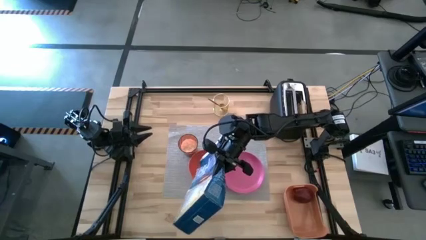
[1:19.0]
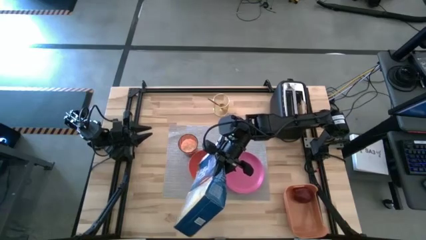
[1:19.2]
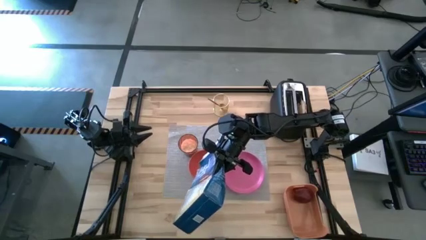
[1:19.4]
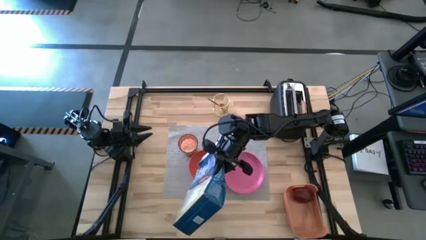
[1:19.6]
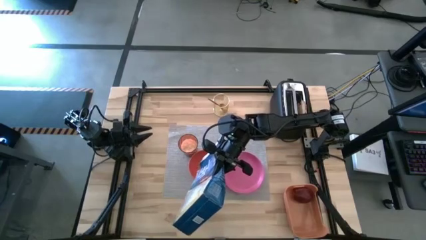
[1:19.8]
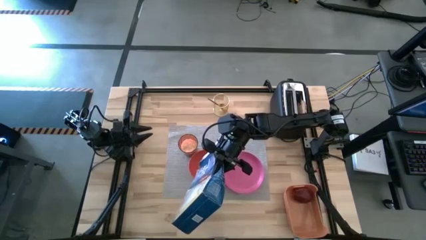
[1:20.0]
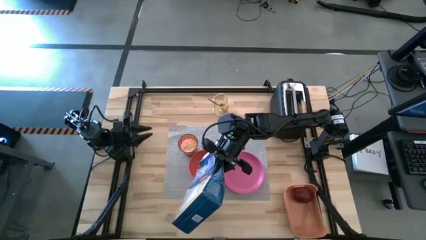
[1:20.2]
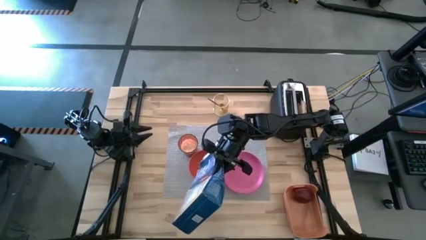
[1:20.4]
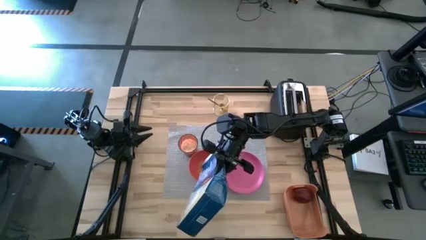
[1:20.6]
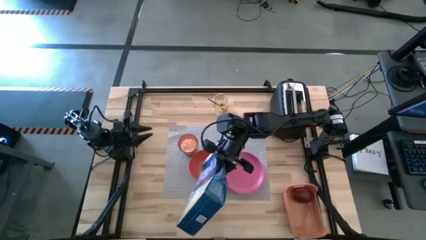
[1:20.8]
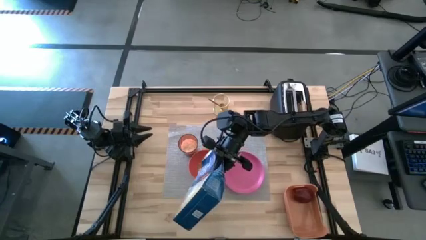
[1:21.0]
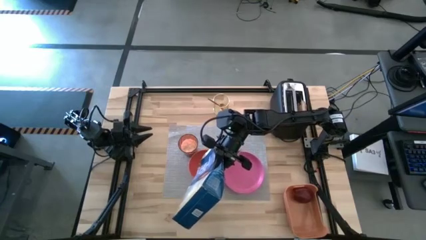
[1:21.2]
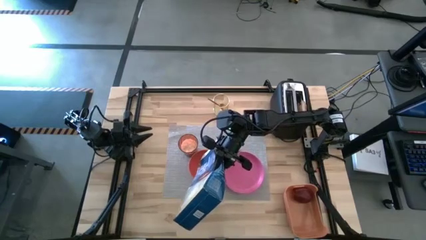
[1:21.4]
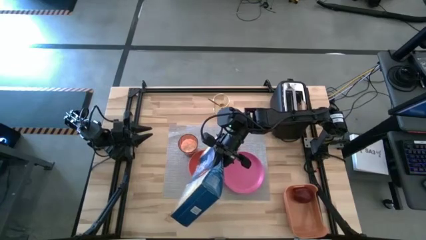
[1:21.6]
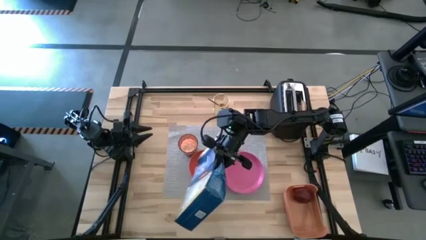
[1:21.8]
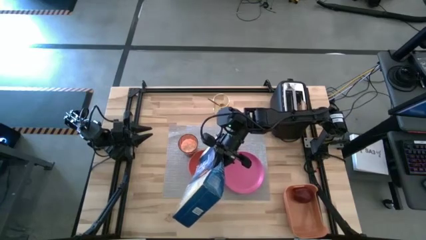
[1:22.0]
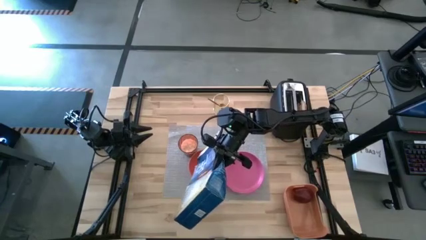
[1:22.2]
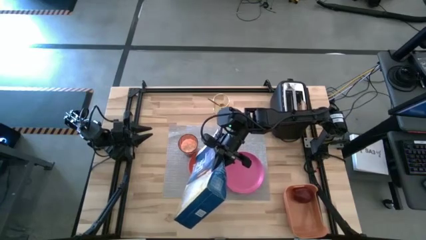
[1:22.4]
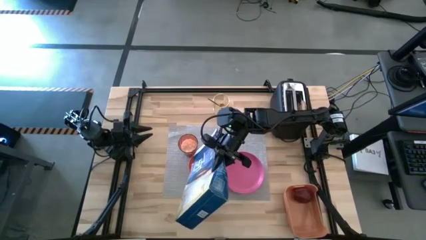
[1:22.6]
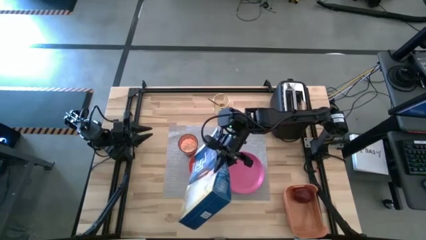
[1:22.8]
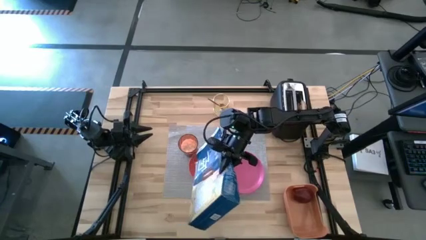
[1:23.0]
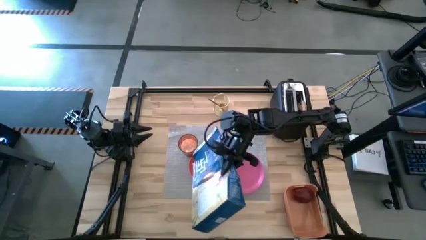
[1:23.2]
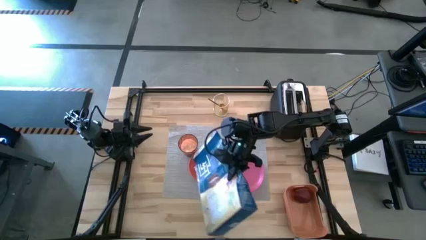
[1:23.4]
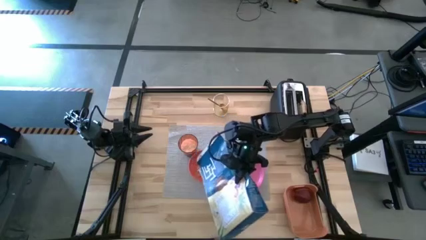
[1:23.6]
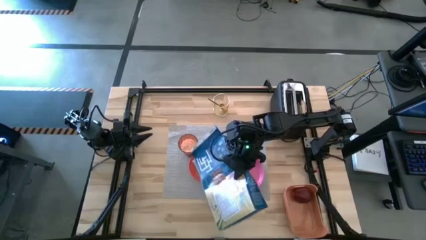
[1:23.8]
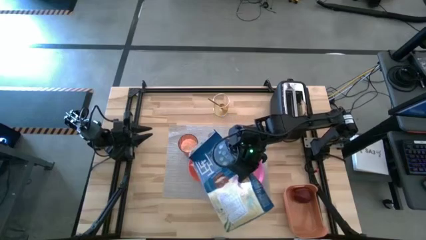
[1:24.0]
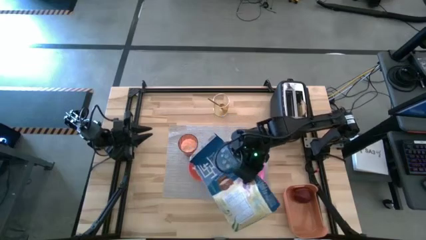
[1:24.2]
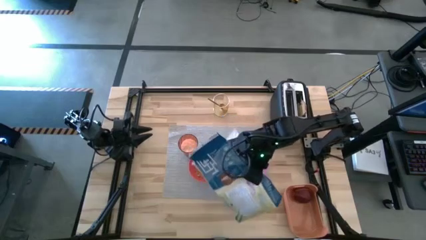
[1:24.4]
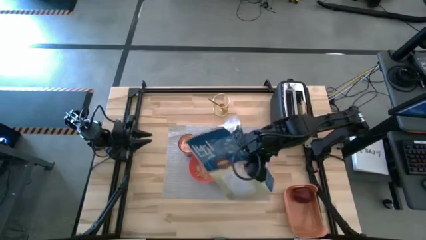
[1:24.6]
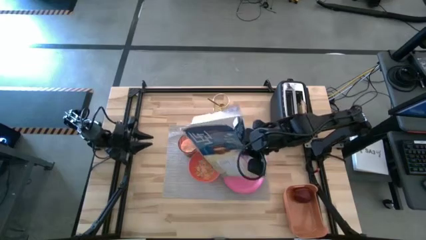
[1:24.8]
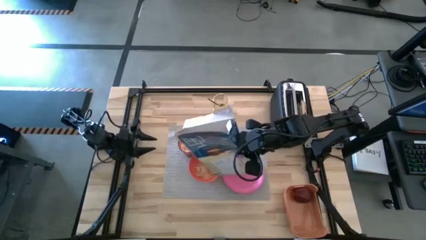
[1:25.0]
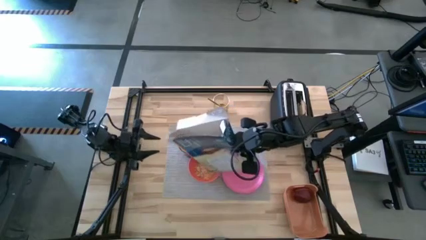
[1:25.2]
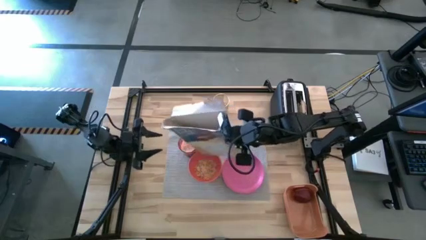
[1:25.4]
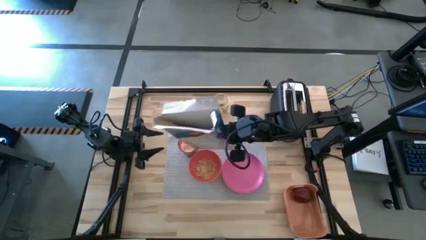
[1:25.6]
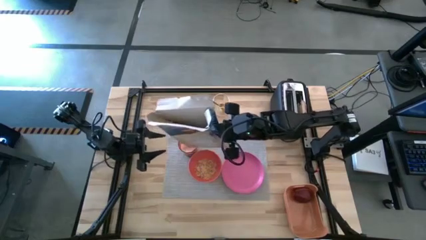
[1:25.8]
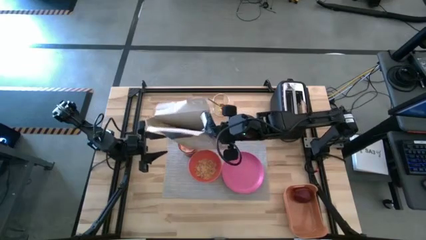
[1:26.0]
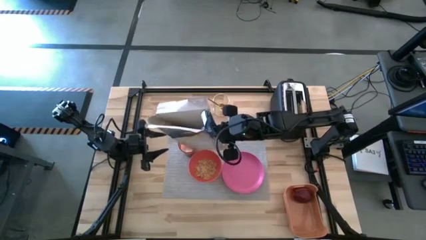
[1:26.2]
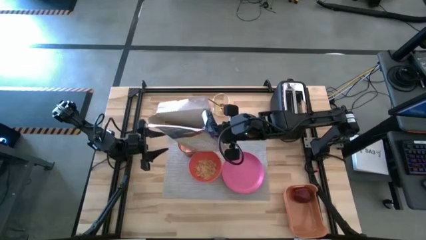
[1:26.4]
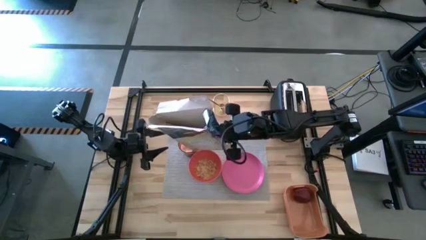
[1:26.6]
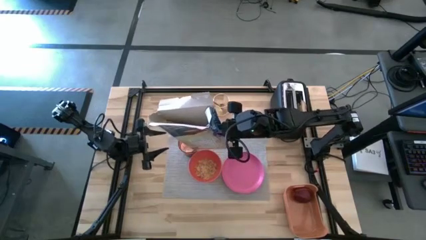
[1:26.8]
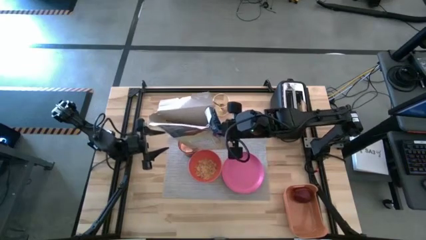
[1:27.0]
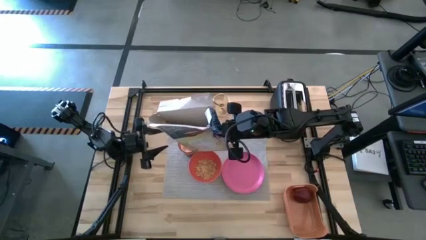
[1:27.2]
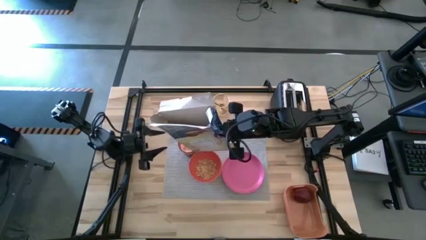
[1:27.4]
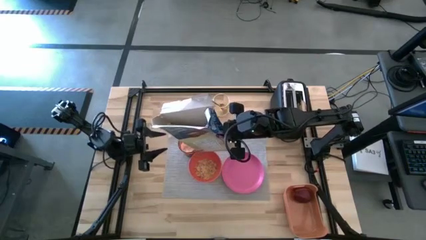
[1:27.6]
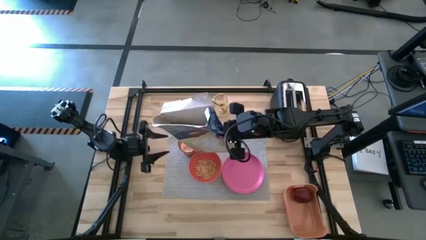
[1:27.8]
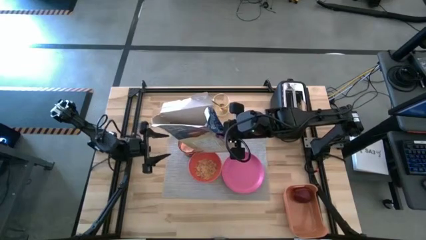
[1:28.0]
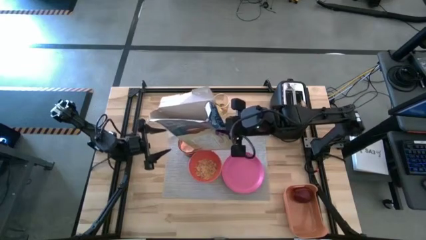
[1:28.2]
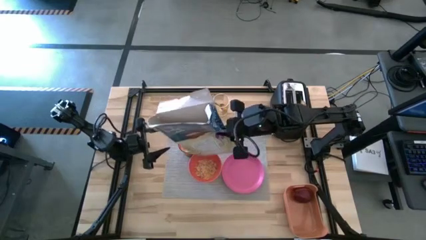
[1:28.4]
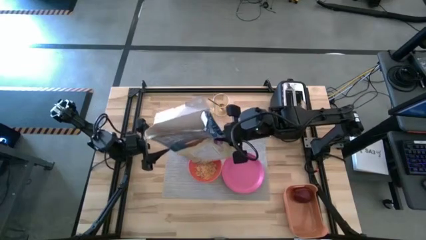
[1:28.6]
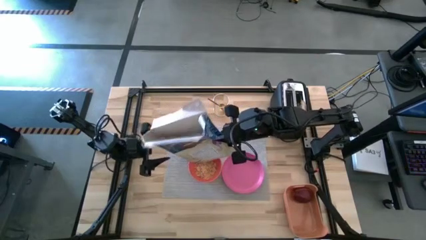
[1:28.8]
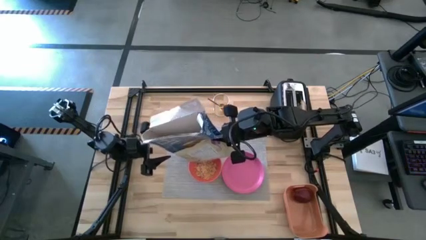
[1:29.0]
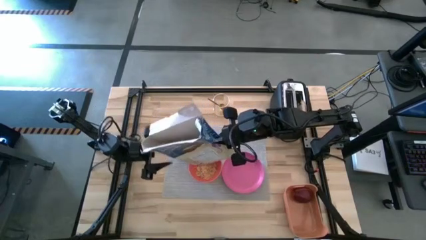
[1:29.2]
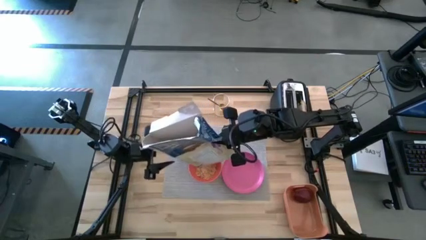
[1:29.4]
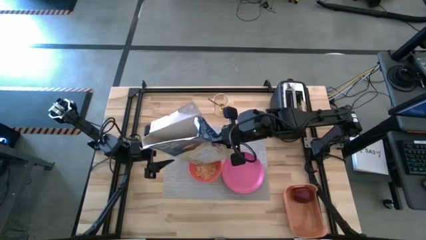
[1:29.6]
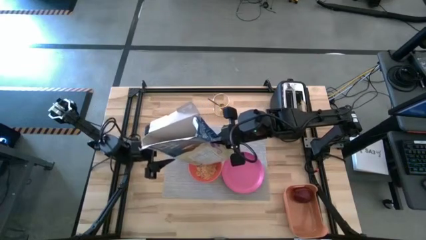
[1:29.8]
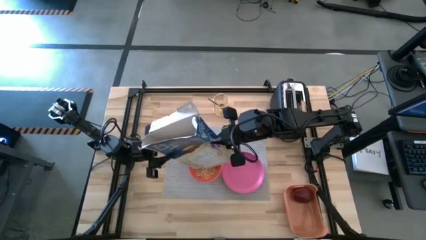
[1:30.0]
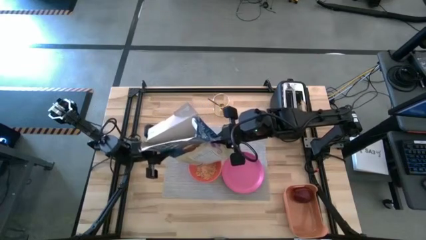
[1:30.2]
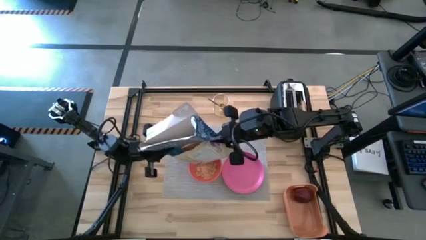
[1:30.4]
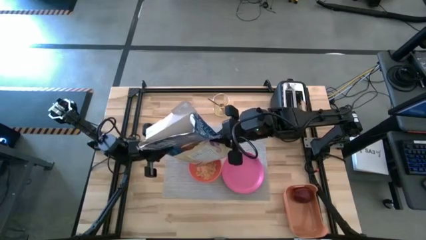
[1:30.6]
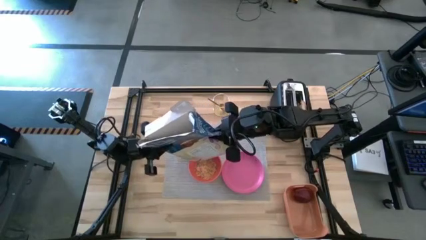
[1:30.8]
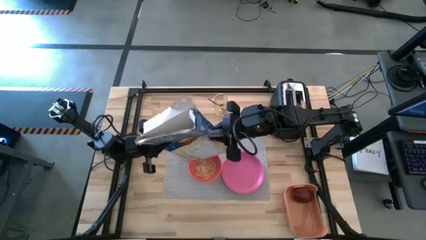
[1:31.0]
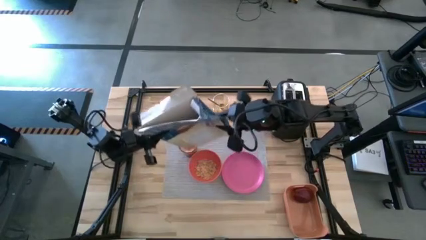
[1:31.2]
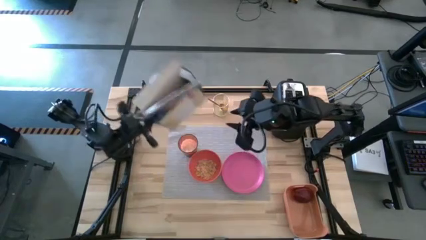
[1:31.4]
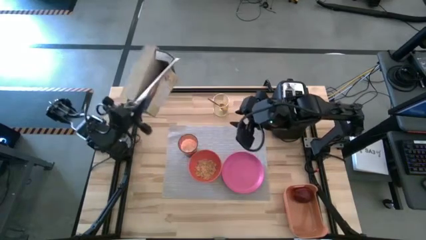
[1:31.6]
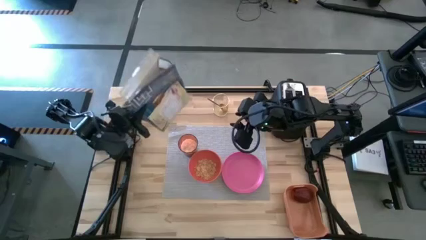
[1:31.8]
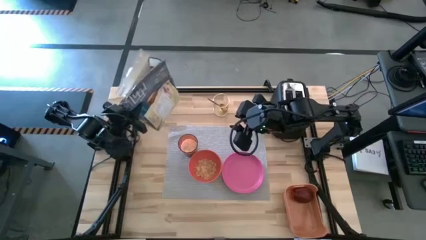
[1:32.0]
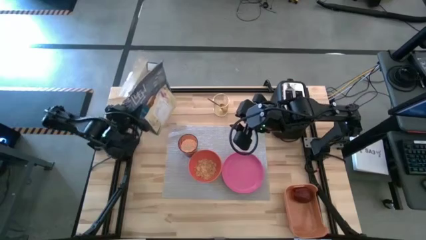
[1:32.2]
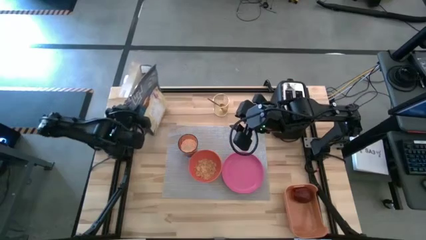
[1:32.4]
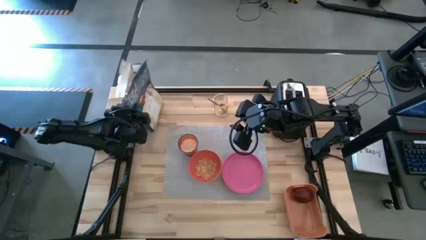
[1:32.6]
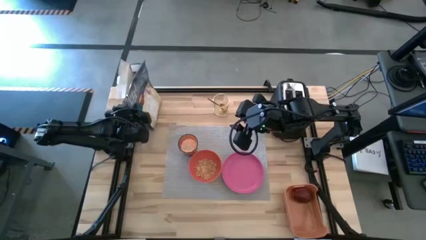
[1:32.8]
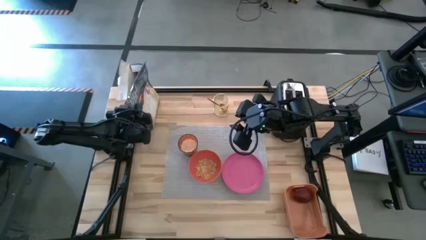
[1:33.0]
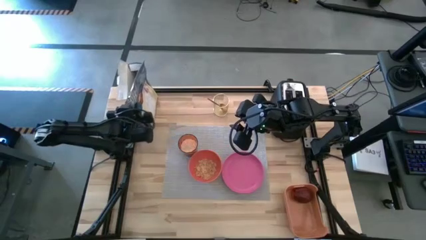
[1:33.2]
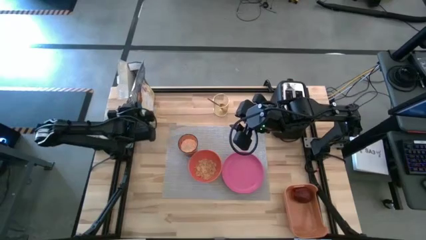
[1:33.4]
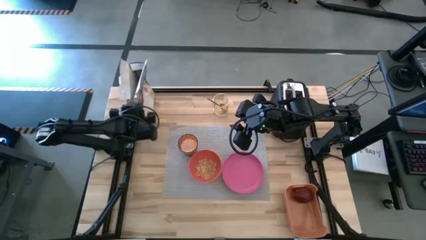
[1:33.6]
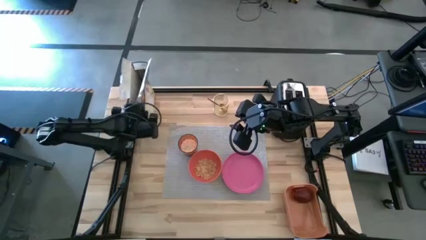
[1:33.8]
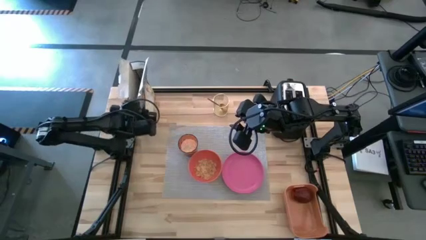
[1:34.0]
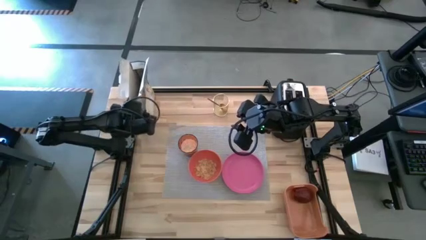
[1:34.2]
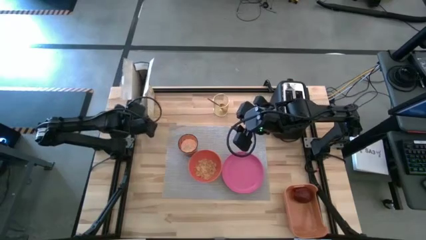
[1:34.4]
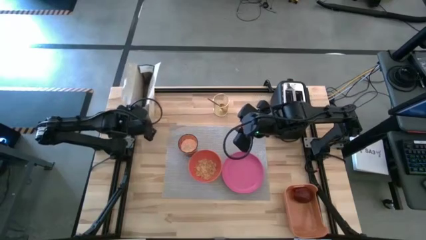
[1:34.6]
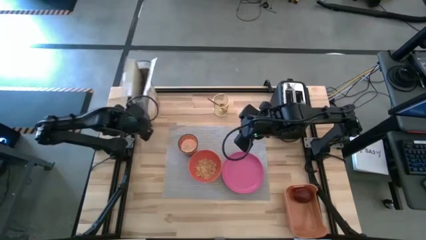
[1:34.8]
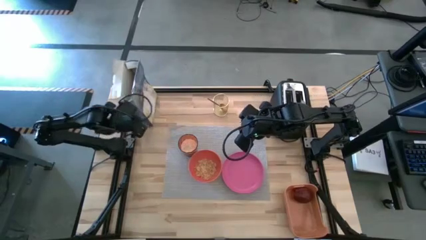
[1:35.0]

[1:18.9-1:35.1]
Task: Arrange a breakfast setting
Pour the cereals from the blue cereal box into the orange bowl
